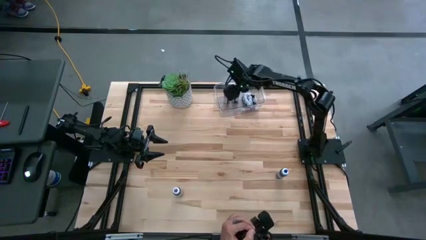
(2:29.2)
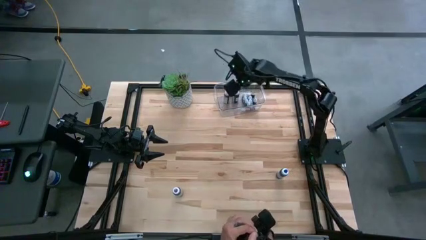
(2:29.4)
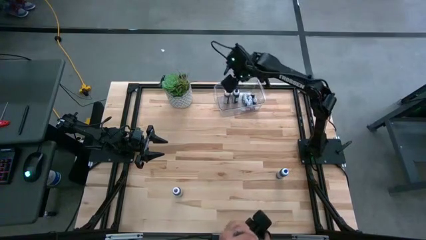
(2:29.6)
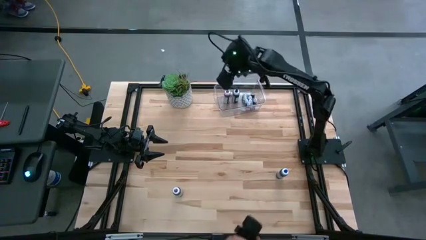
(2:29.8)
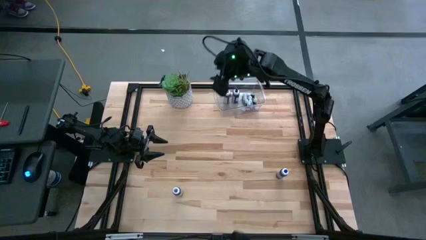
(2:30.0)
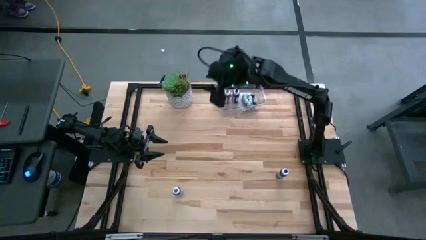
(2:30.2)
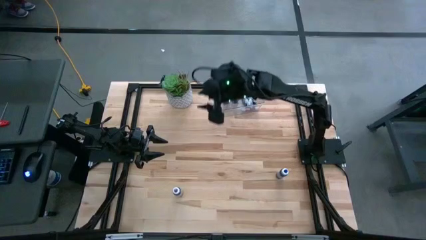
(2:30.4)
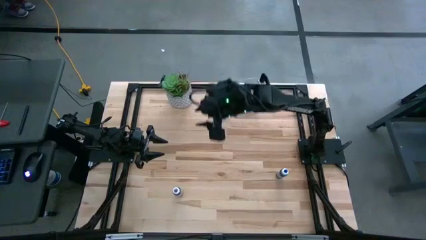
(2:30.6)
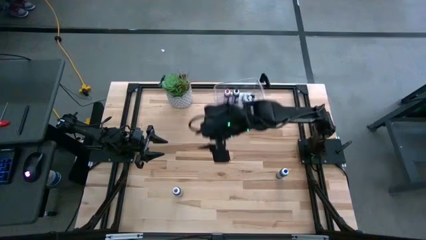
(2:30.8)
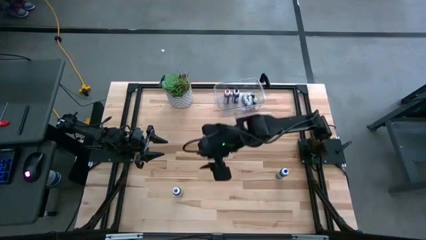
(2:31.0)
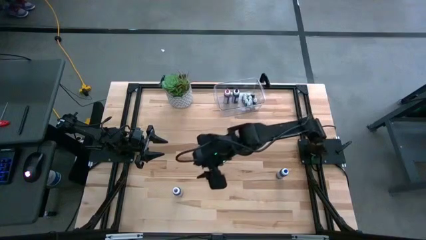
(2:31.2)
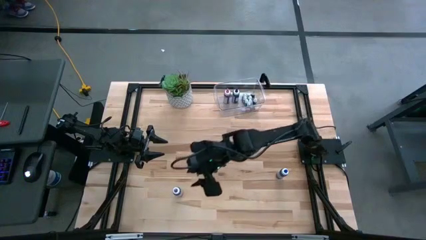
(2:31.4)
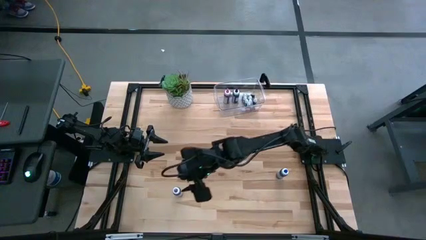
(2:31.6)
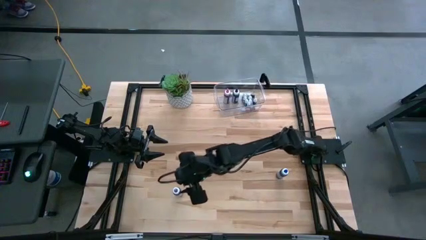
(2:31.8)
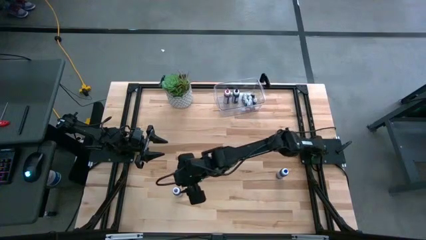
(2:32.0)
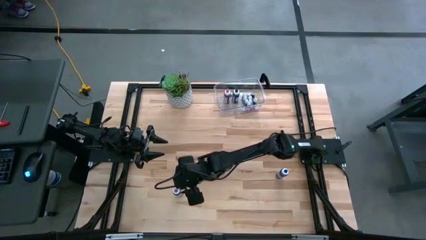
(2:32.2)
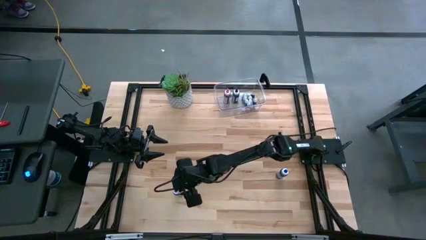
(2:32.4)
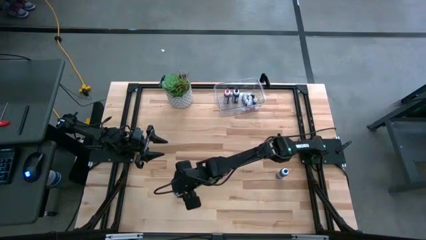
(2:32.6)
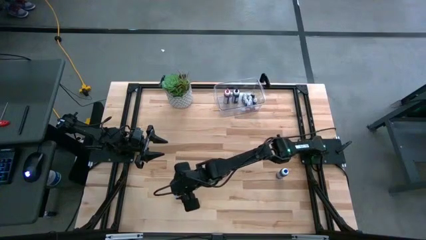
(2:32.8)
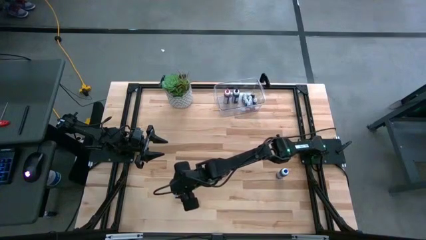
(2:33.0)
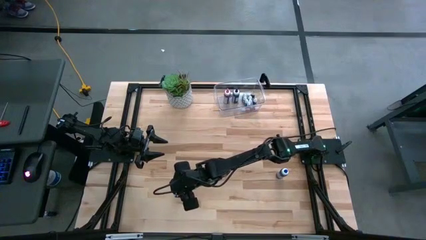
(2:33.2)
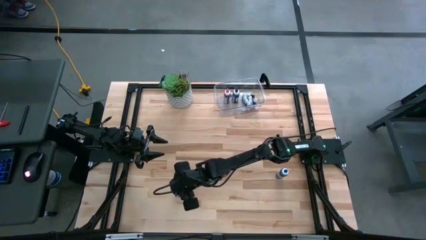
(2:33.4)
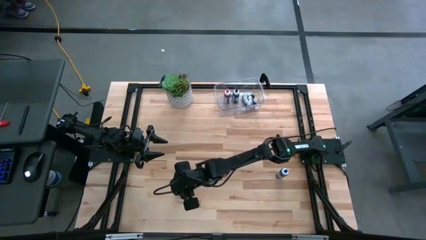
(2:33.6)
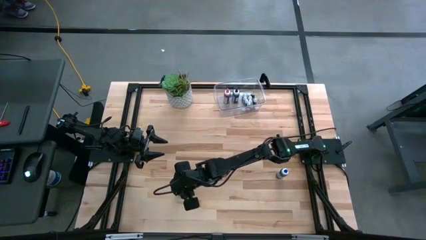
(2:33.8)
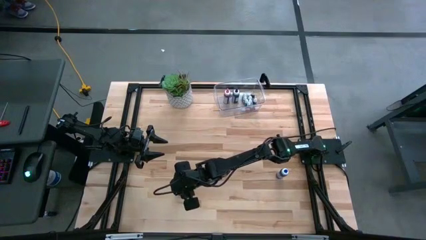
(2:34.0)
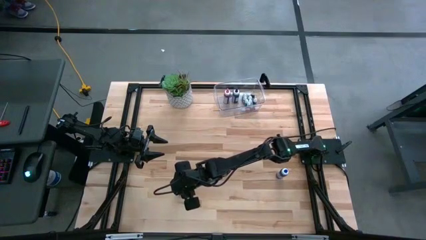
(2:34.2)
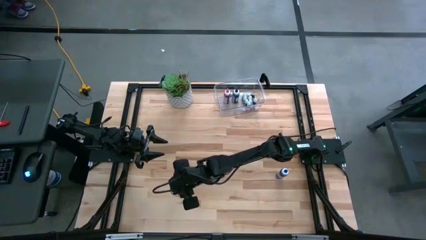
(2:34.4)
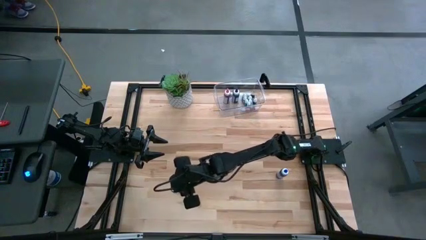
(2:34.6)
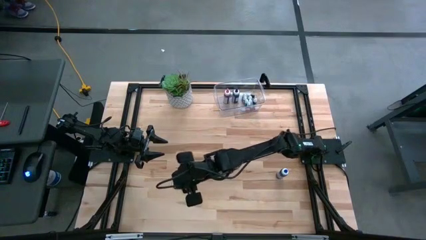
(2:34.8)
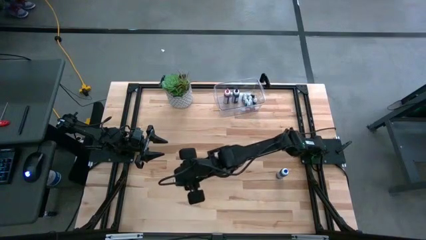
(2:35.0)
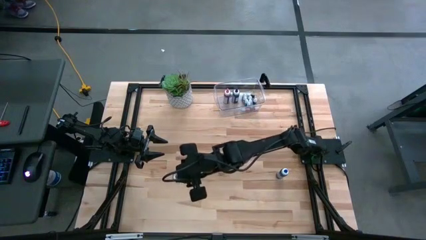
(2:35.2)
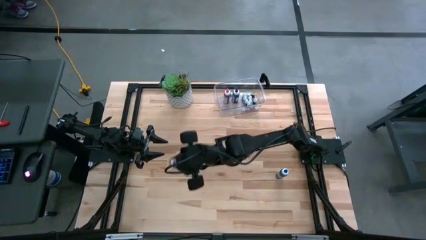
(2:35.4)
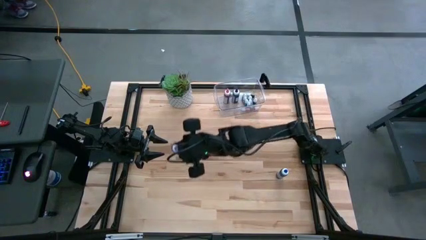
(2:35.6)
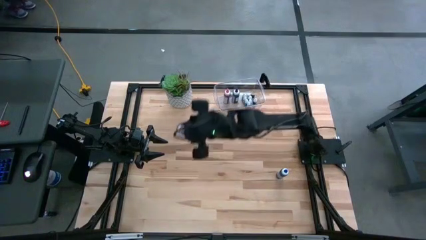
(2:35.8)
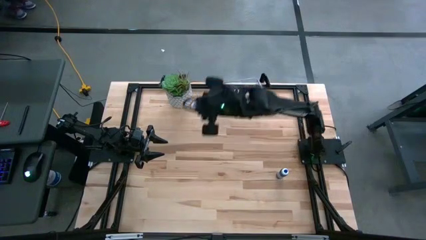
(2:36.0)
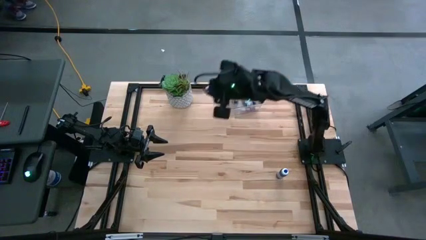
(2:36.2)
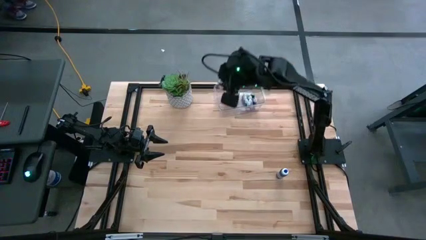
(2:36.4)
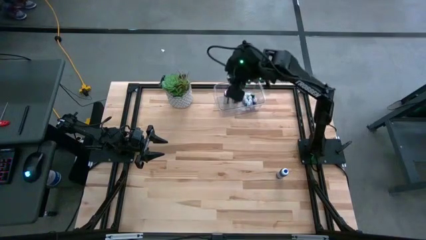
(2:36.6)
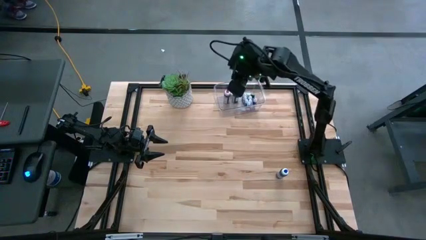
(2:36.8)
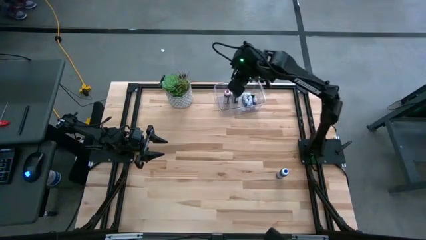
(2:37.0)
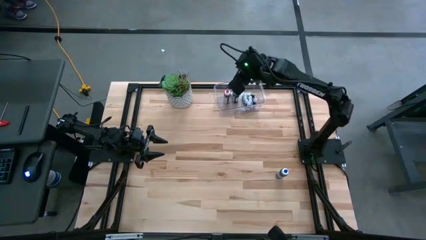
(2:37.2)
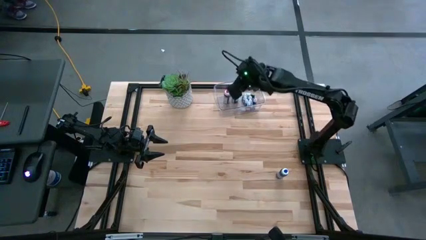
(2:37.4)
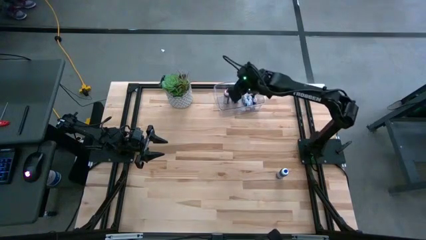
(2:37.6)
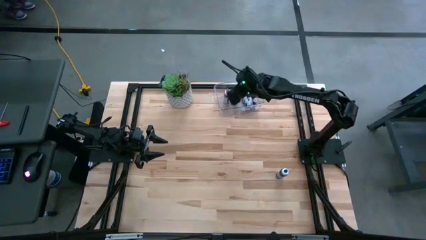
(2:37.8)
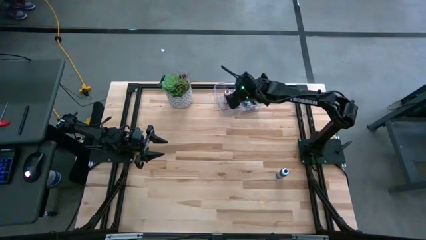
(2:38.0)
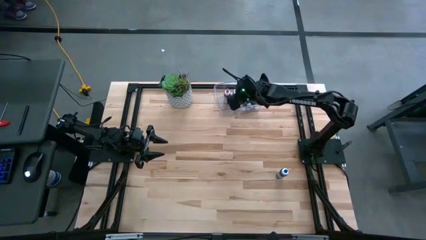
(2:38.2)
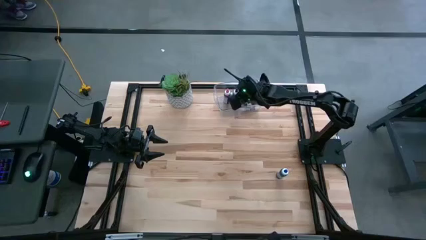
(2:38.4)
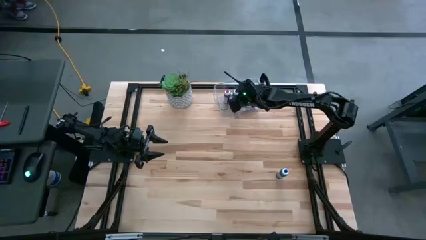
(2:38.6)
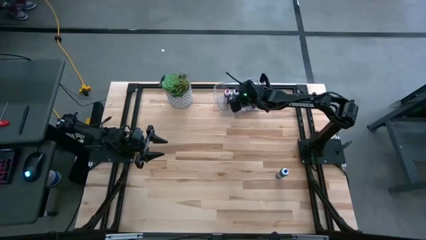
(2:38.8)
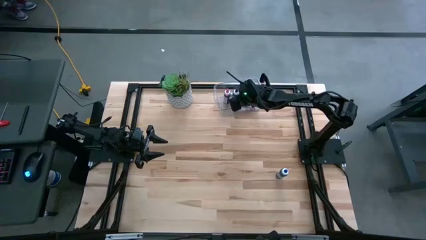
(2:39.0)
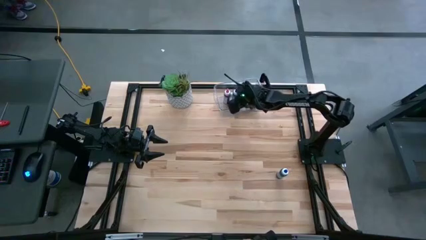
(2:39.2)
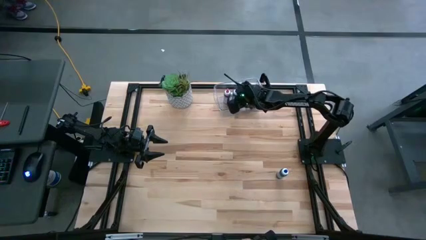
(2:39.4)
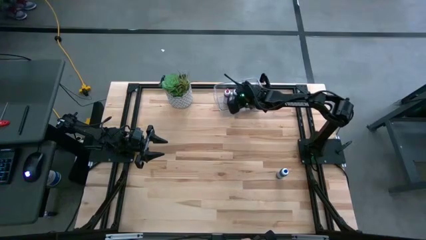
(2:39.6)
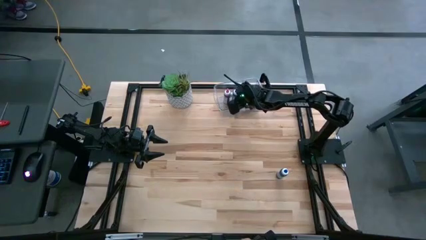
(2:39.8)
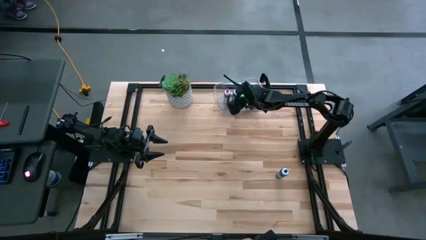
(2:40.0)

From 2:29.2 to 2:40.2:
Task: Pick & Place food coloring
Put the large purple food coloring bottle into the bin
